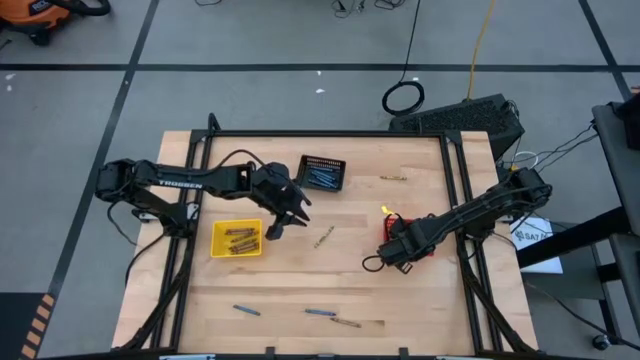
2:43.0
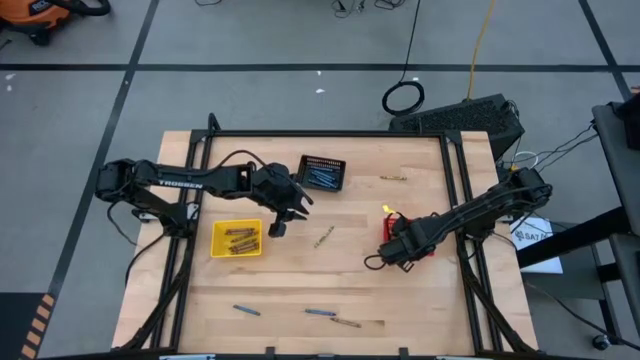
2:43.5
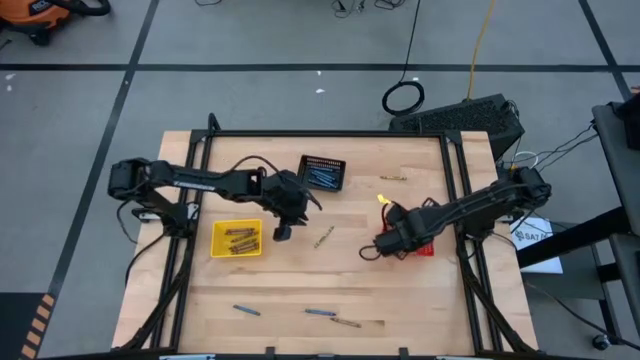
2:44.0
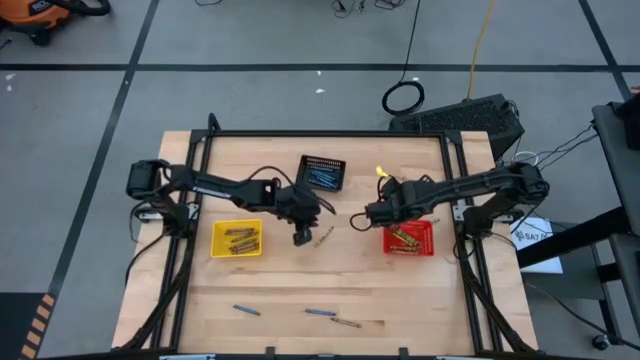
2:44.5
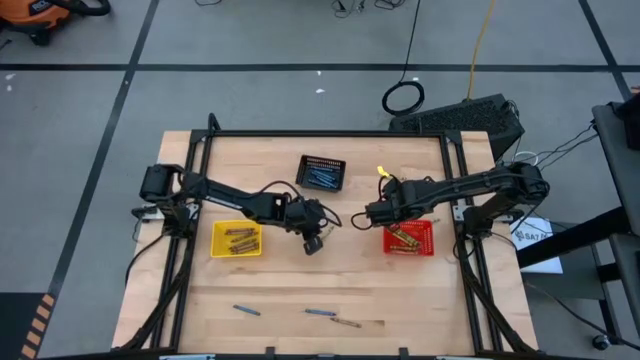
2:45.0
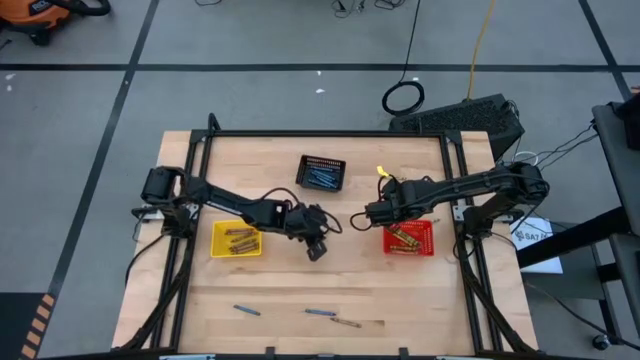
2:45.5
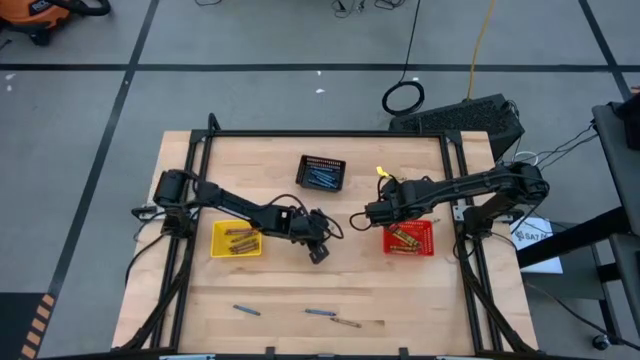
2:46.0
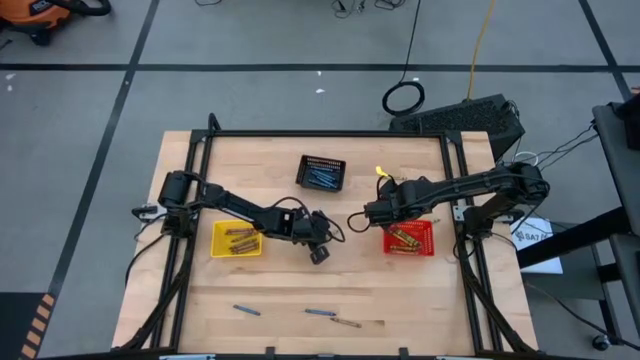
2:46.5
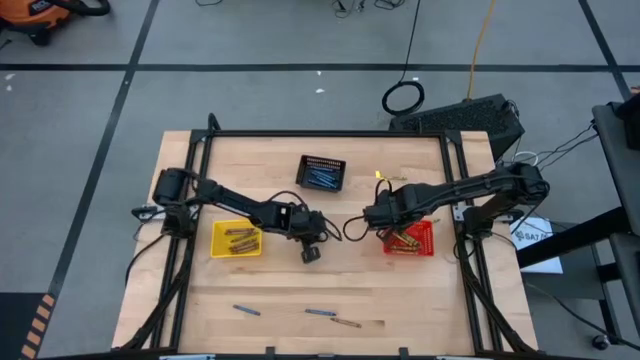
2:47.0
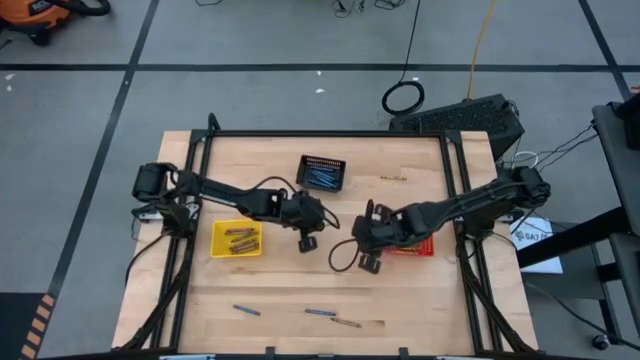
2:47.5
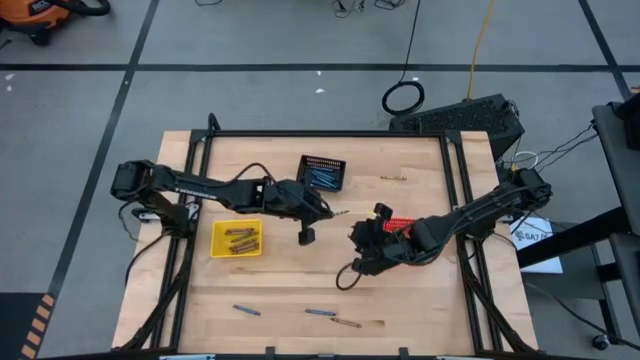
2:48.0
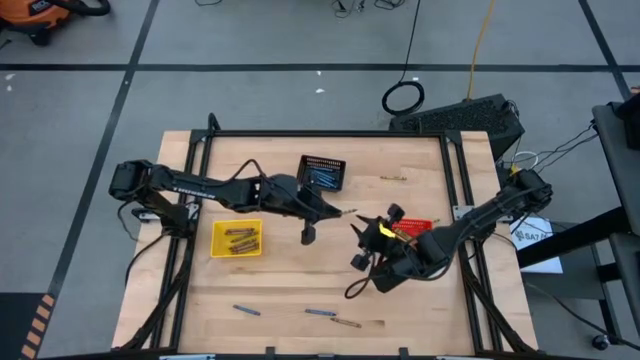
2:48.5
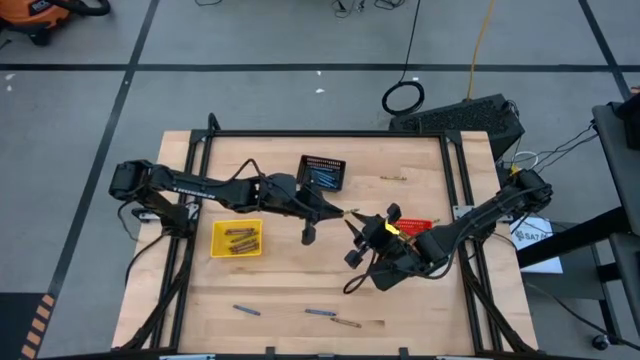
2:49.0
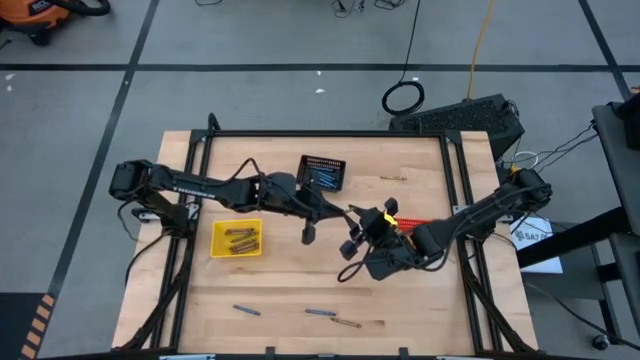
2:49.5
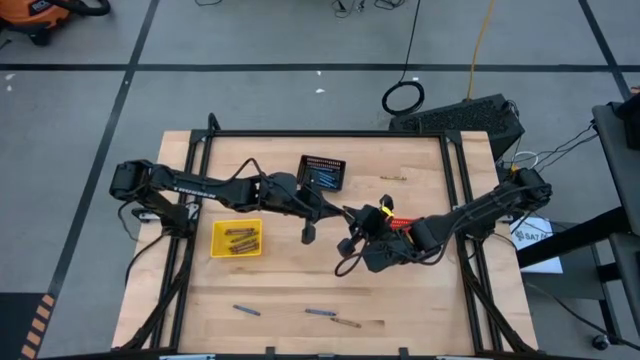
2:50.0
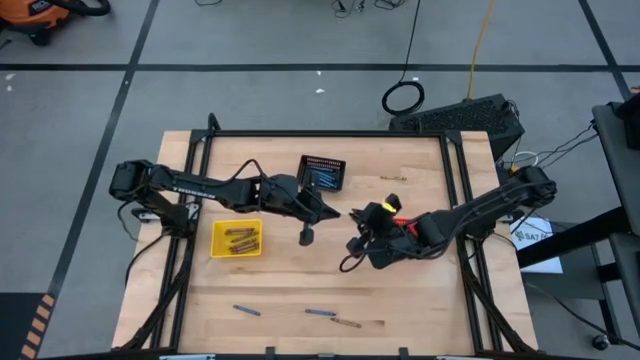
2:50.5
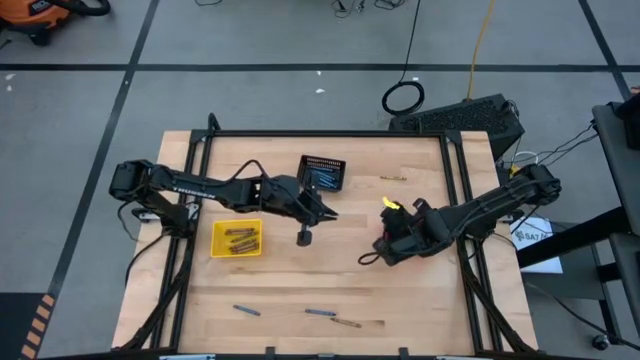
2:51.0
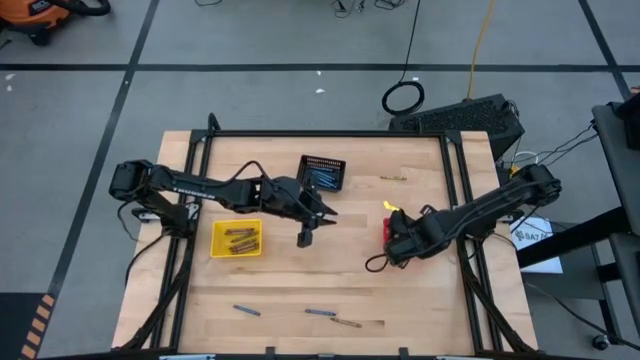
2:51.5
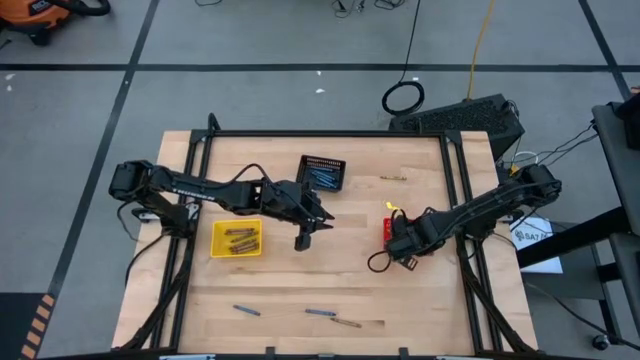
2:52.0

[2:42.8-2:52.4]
Task: Sort crayons
Put the green crayon into the red bin

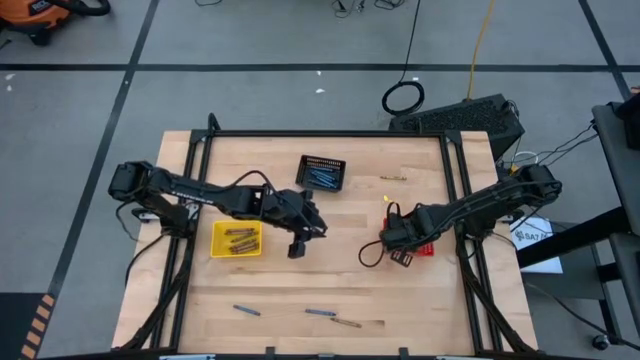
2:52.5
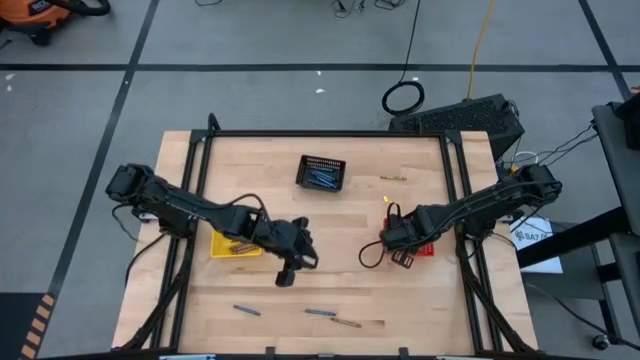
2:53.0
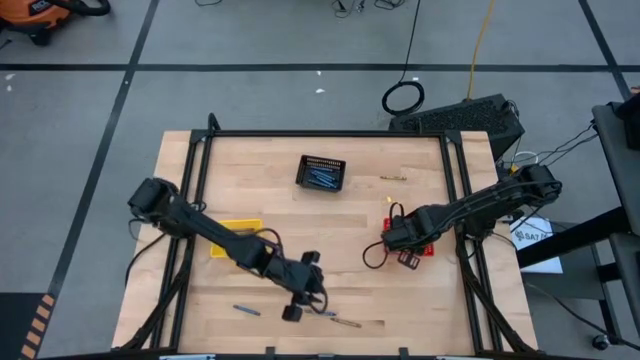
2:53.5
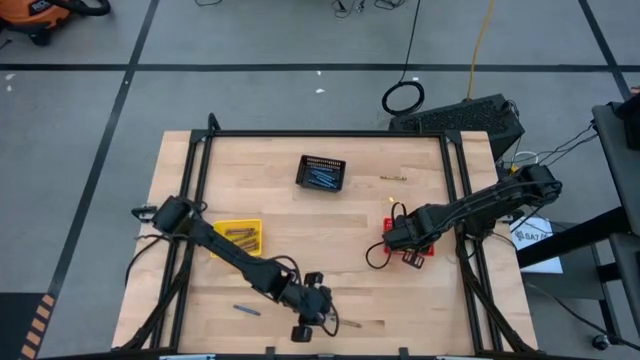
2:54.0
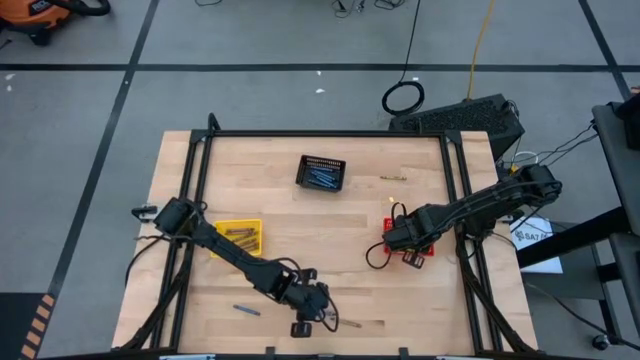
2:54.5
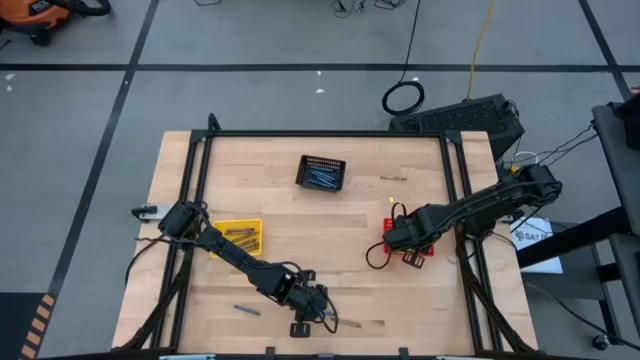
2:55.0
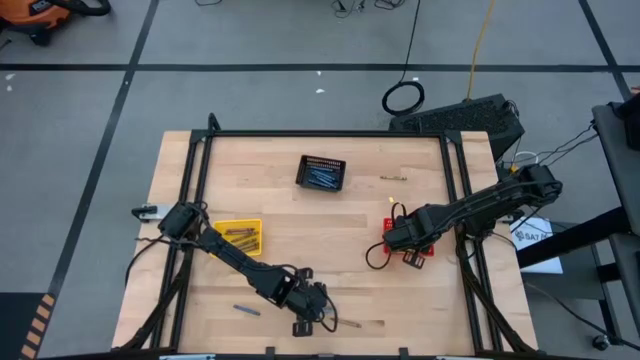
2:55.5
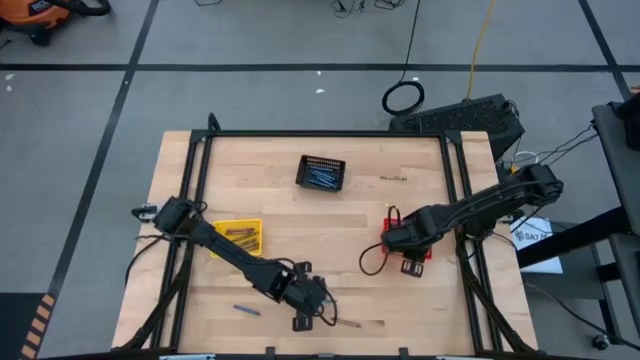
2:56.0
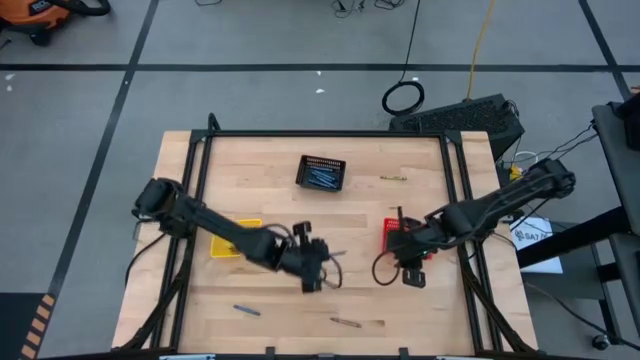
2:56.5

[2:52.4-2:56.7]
Put the blue crayon into the black bin

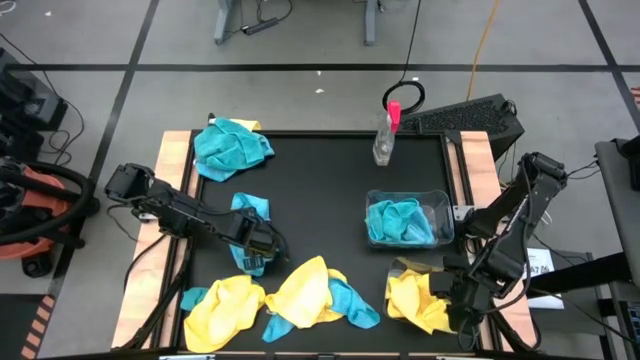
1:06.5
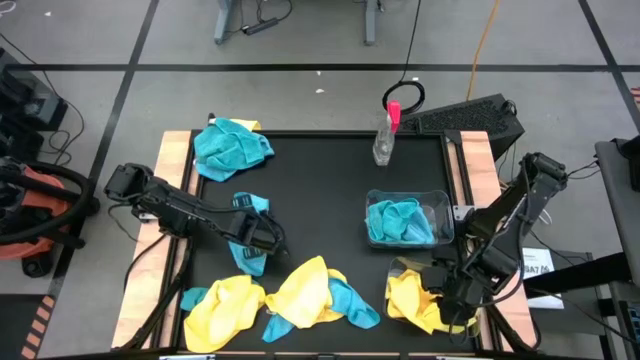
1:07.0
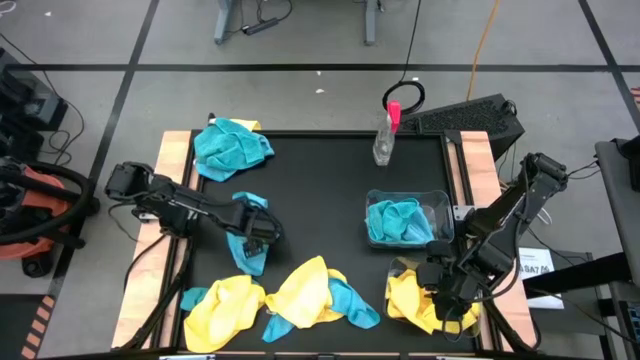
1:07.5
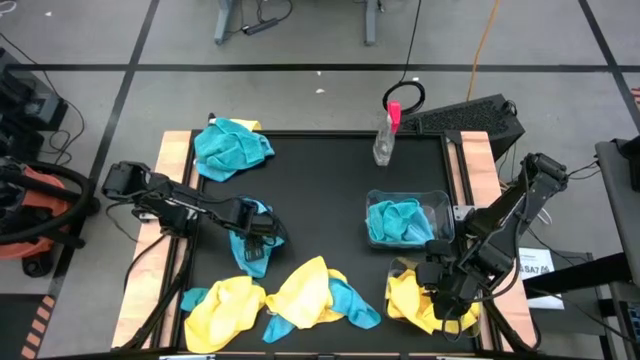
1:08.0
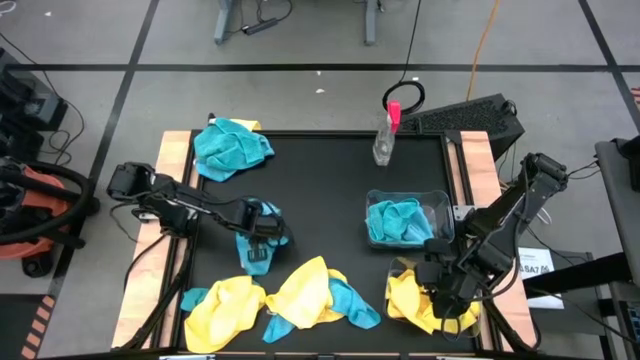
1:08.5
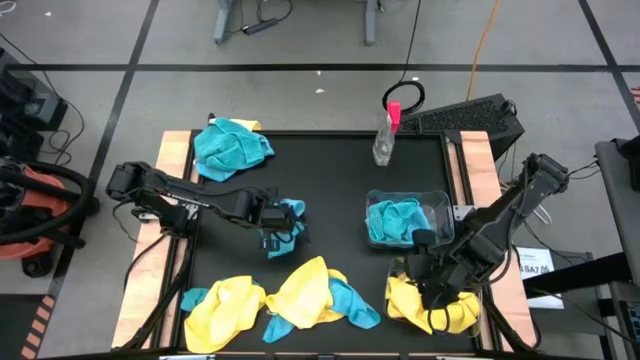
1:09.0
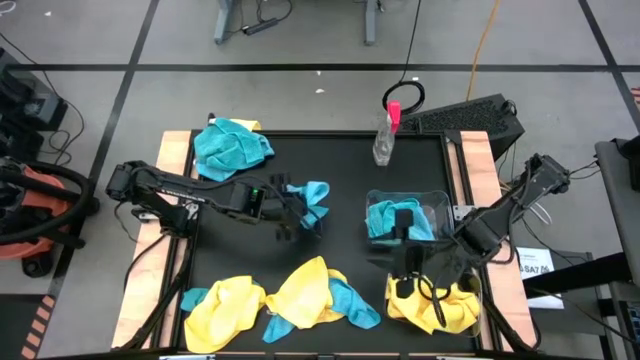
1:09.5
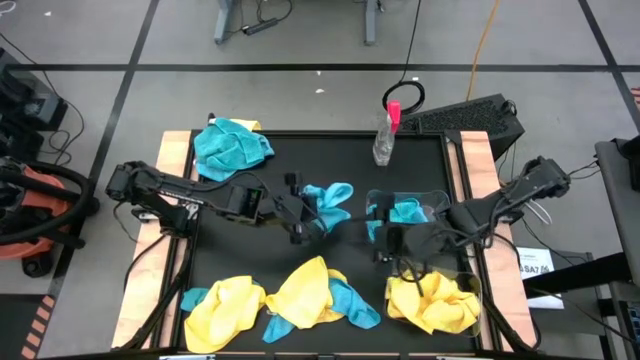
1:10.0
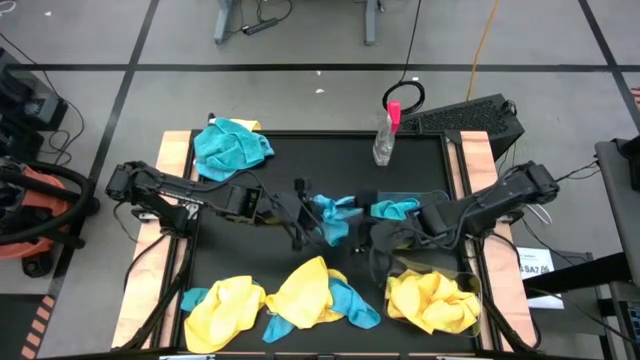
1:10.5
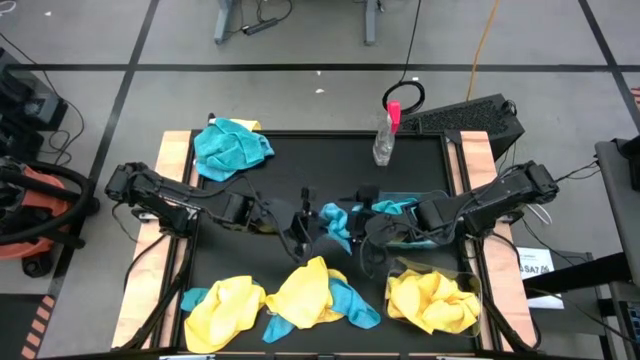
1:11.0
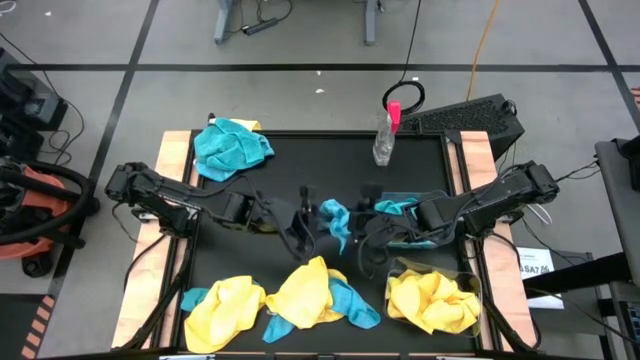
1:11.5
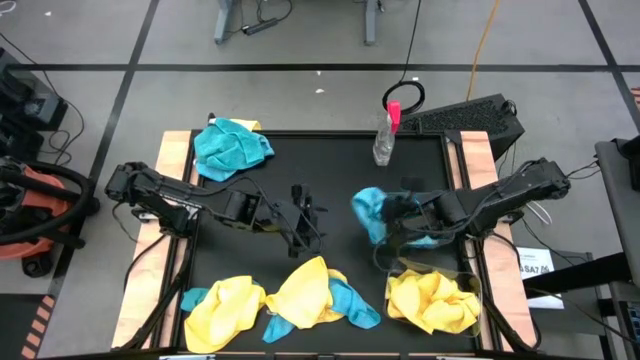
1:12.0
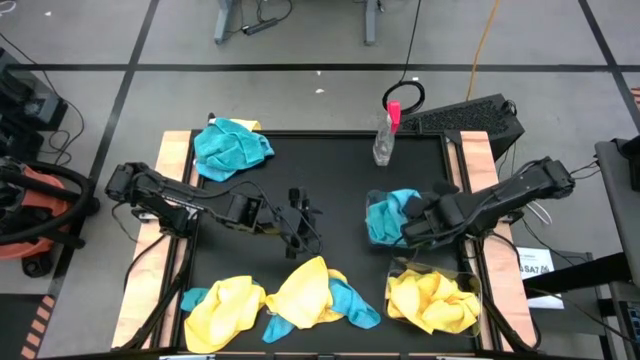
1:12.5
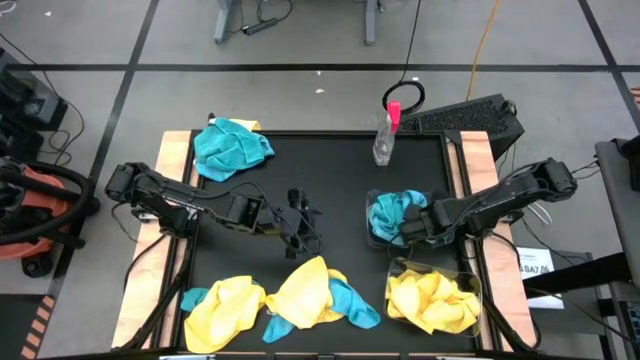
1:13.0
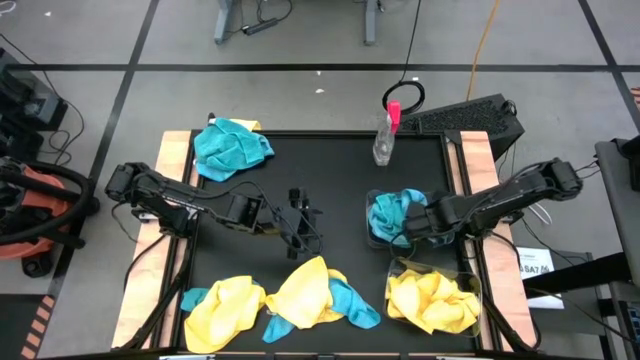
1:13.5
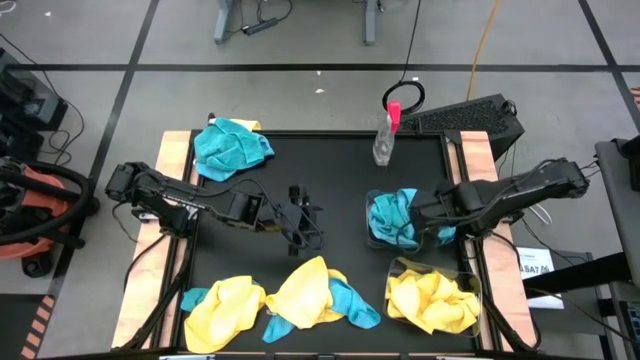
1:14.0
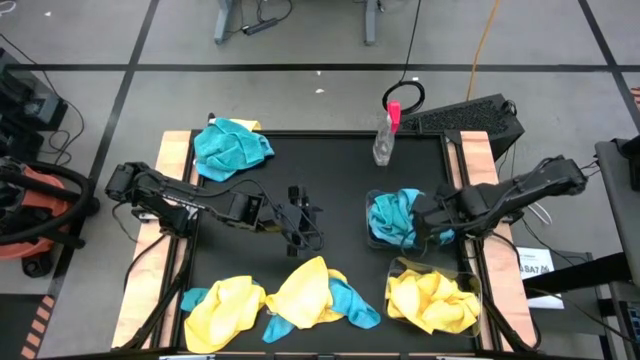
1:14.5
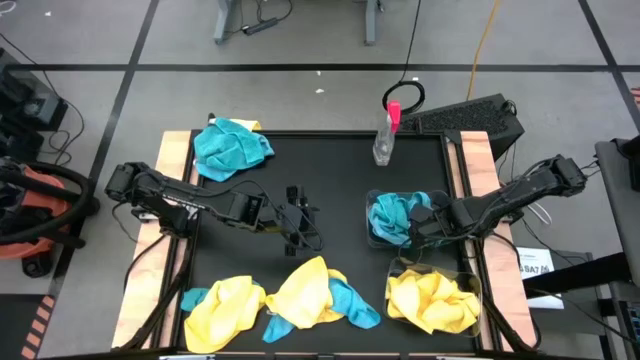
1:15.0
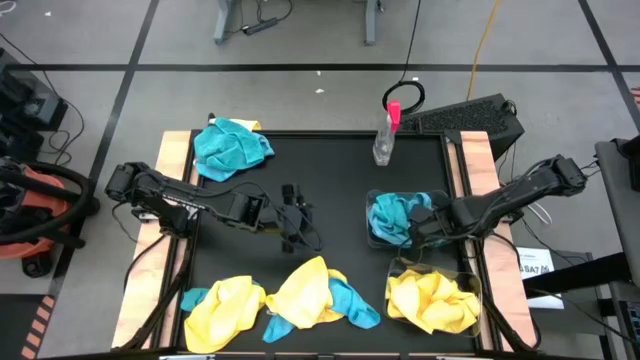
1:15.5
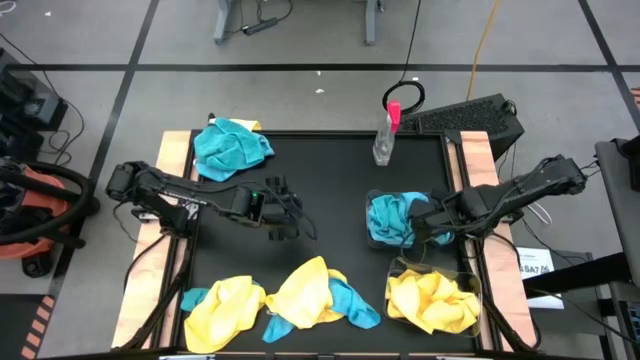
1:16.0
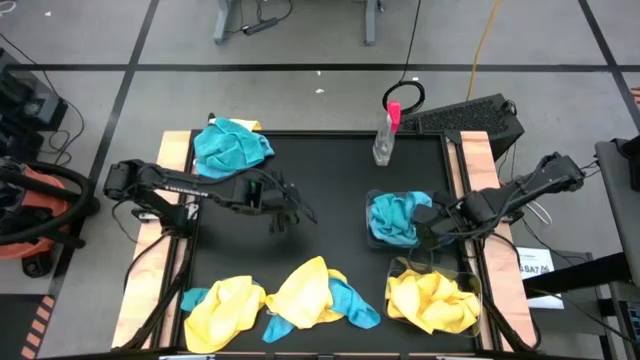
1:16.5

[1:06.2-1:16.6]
Task: Sort microfiber towel by color & place in baskets
Put the blue towel into the top transparent bin
